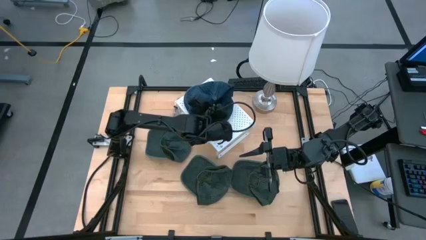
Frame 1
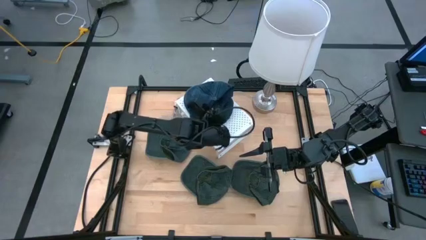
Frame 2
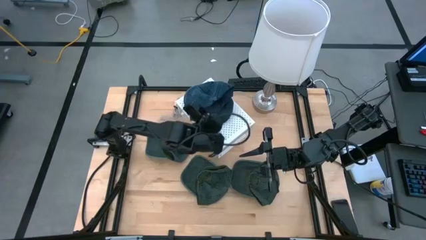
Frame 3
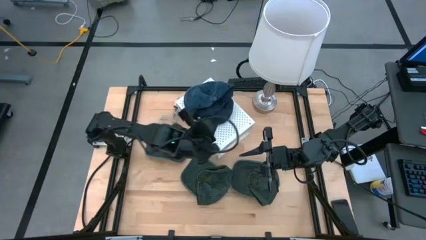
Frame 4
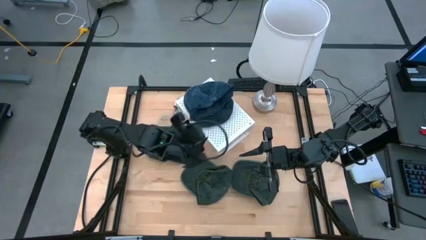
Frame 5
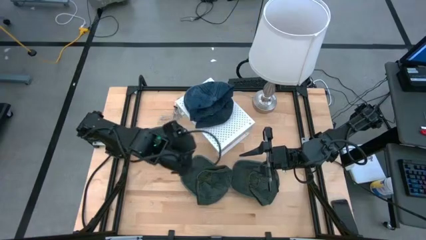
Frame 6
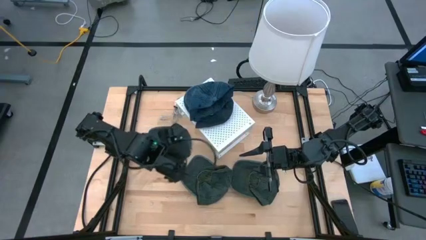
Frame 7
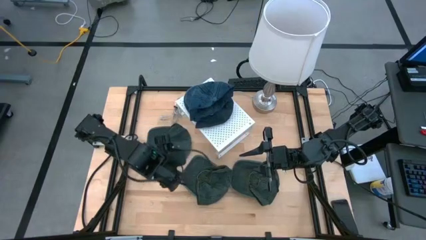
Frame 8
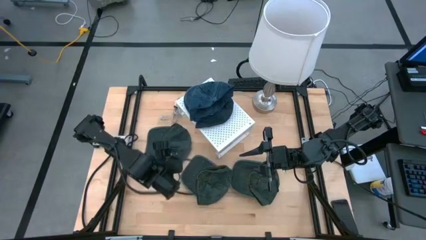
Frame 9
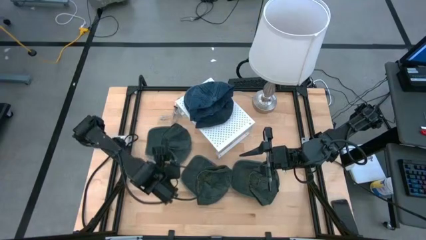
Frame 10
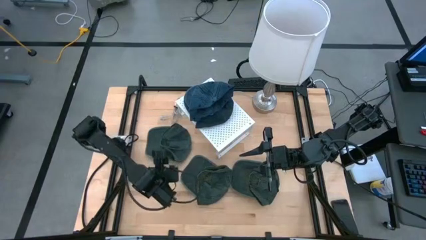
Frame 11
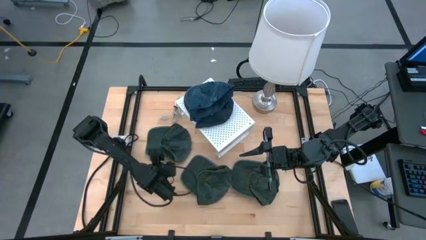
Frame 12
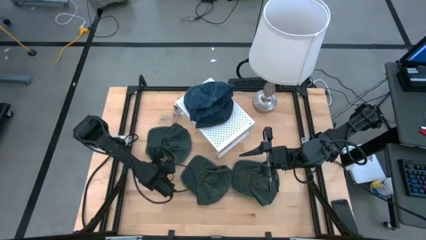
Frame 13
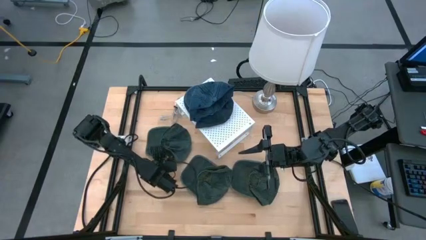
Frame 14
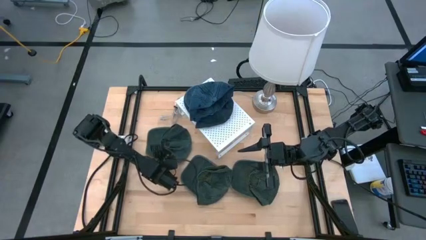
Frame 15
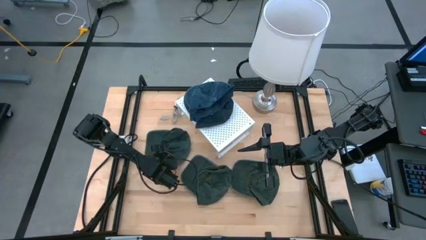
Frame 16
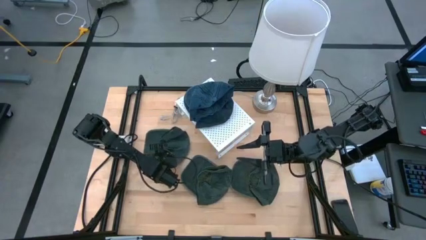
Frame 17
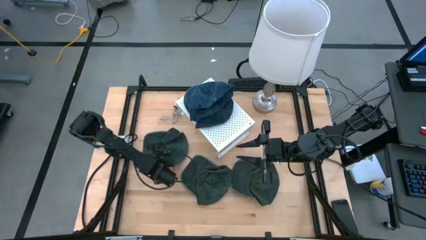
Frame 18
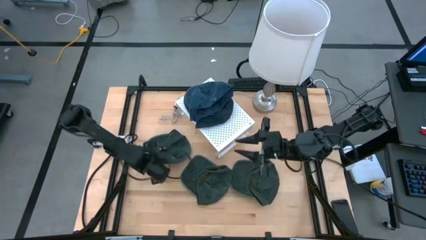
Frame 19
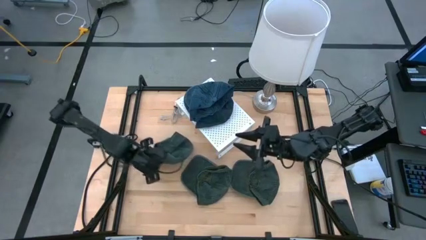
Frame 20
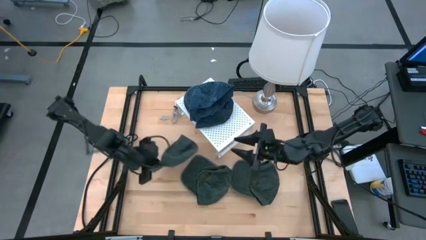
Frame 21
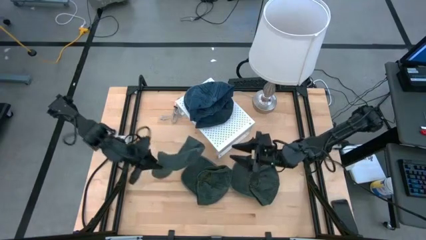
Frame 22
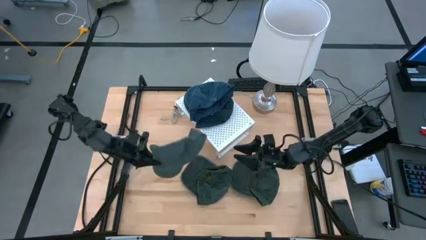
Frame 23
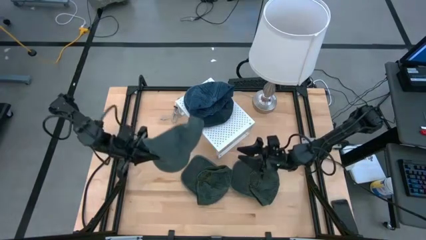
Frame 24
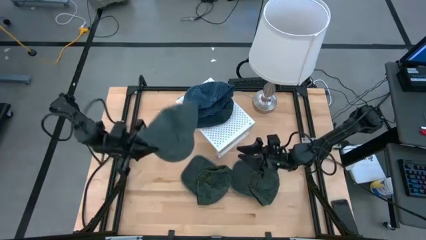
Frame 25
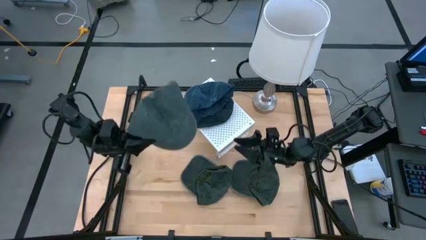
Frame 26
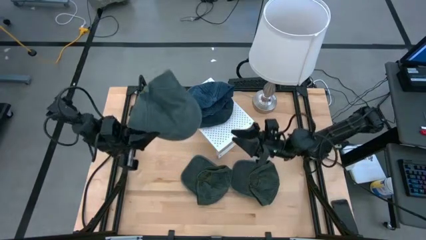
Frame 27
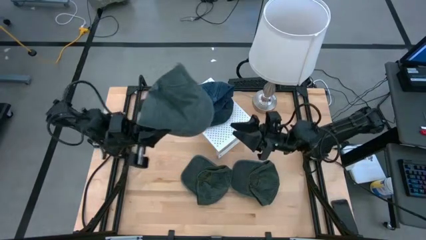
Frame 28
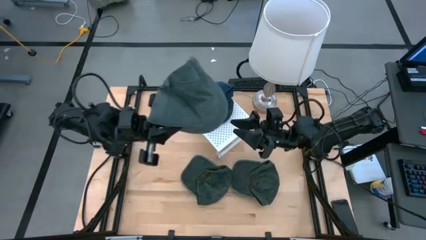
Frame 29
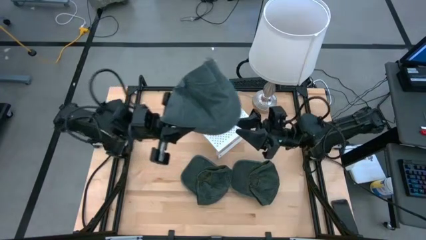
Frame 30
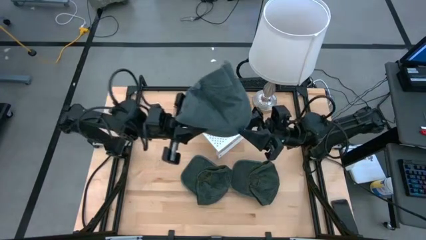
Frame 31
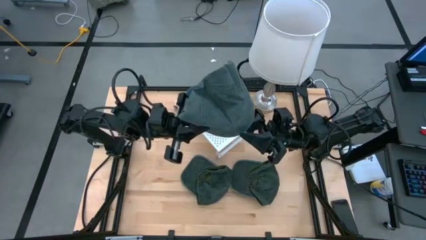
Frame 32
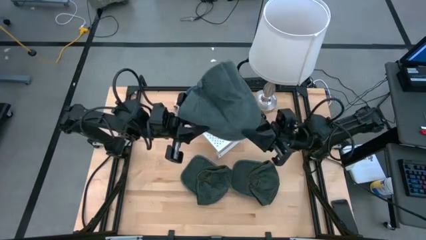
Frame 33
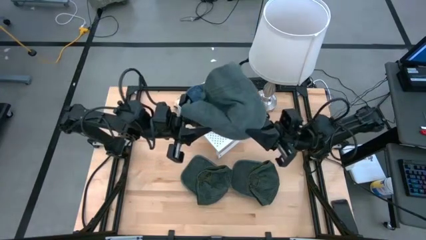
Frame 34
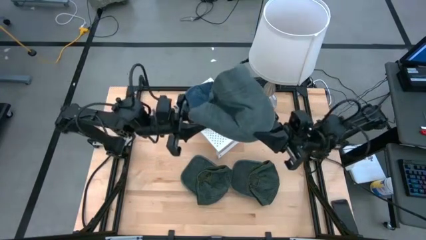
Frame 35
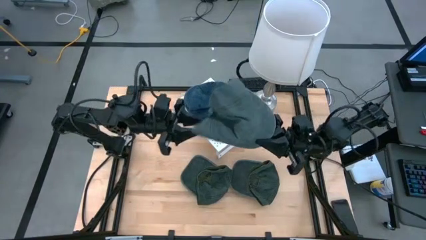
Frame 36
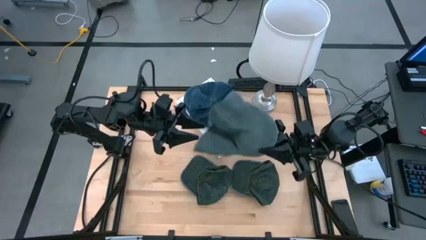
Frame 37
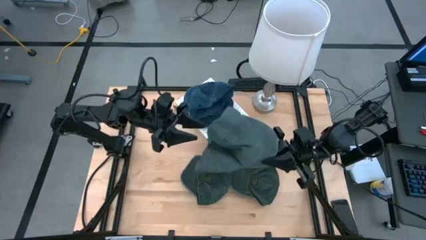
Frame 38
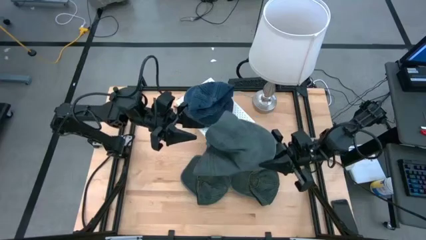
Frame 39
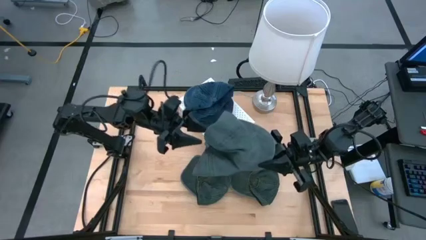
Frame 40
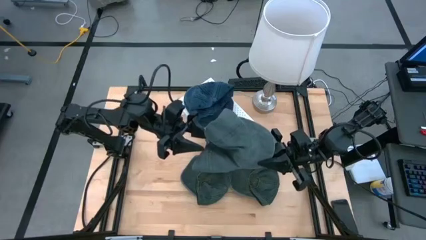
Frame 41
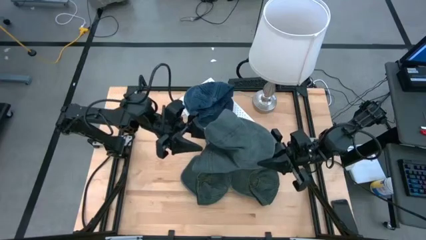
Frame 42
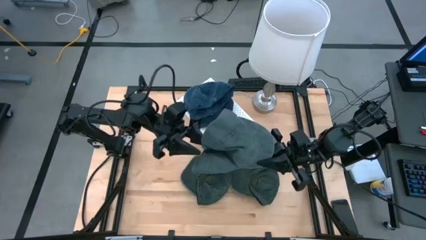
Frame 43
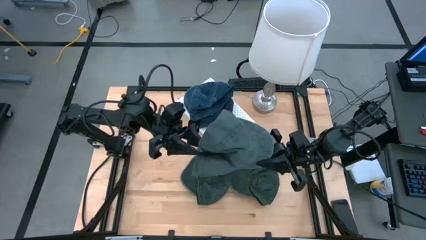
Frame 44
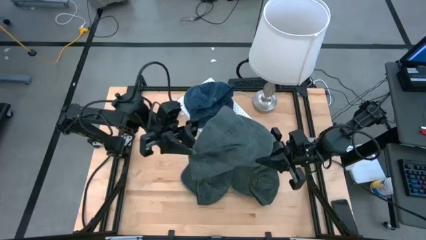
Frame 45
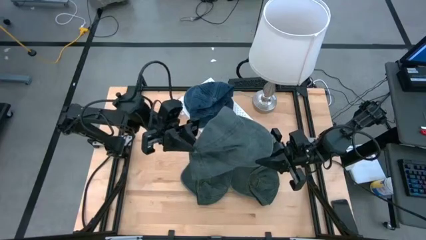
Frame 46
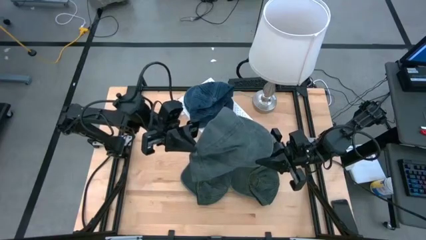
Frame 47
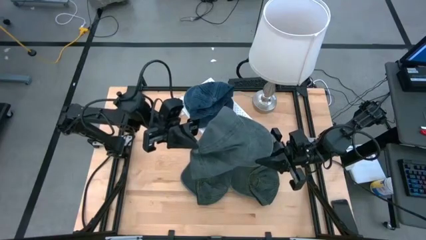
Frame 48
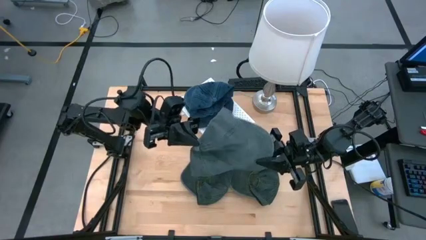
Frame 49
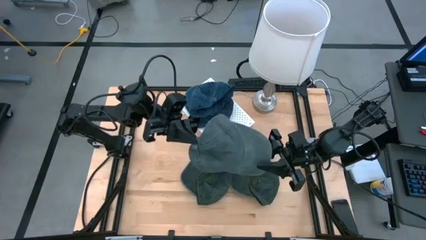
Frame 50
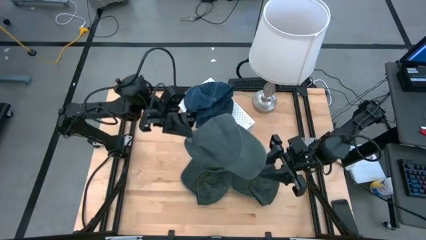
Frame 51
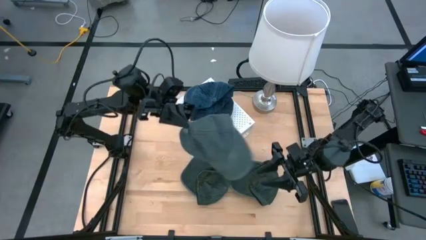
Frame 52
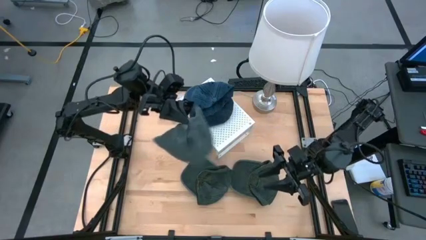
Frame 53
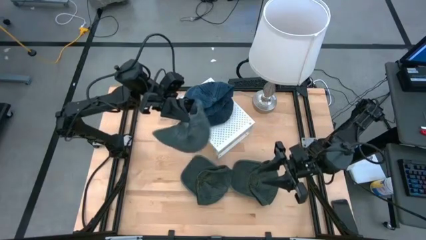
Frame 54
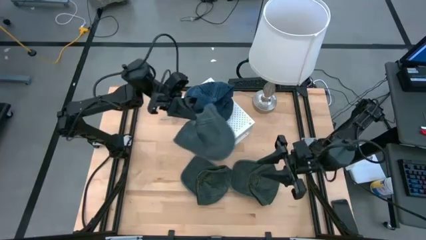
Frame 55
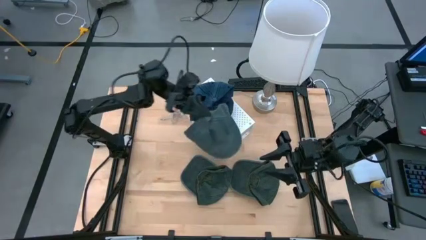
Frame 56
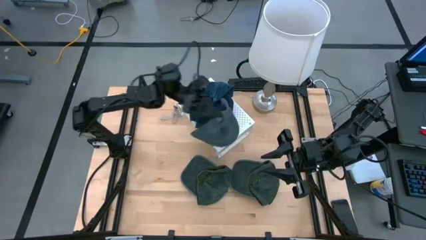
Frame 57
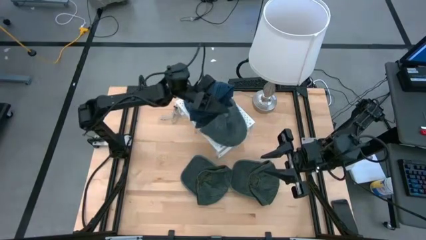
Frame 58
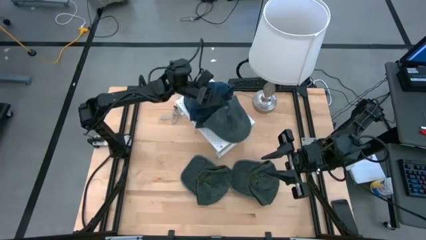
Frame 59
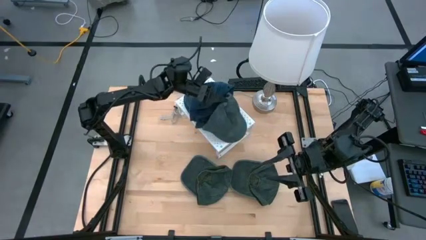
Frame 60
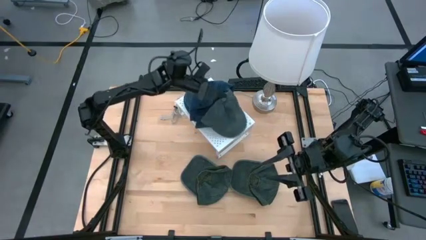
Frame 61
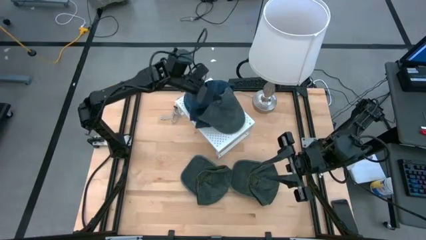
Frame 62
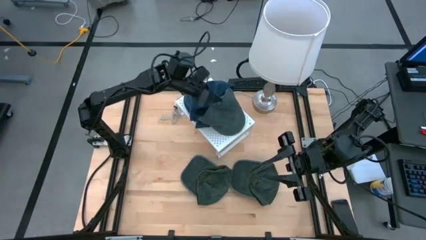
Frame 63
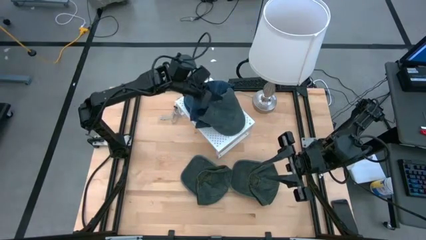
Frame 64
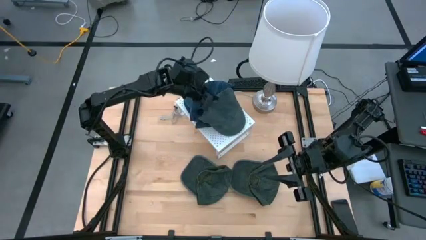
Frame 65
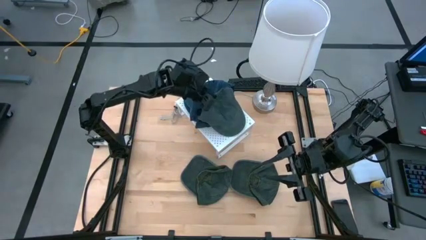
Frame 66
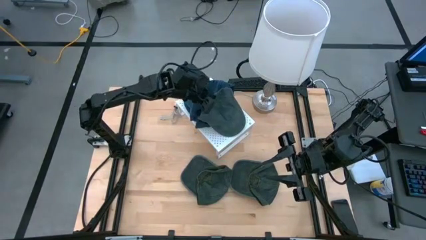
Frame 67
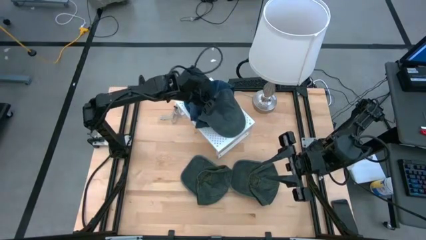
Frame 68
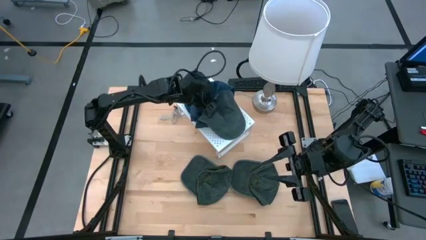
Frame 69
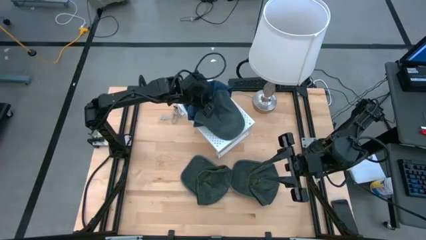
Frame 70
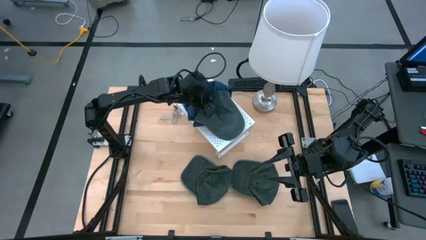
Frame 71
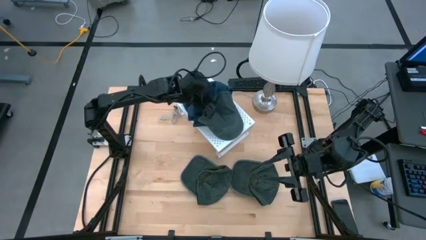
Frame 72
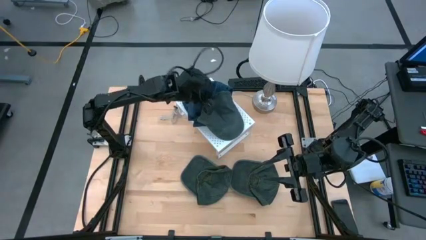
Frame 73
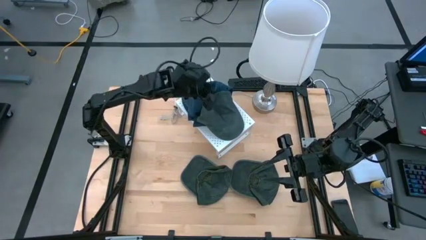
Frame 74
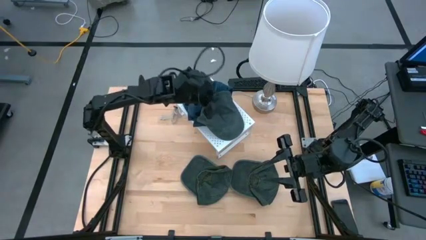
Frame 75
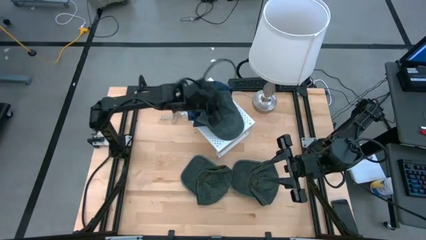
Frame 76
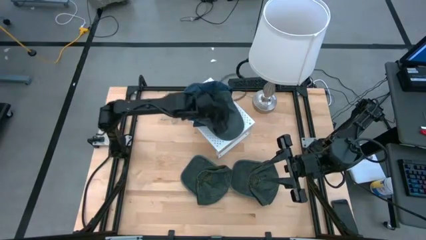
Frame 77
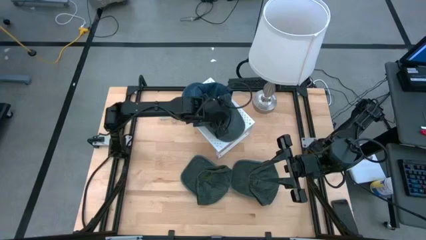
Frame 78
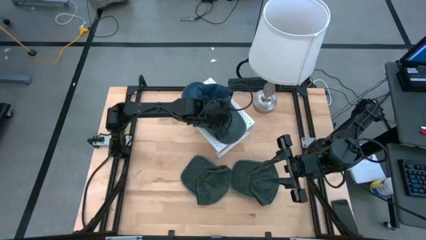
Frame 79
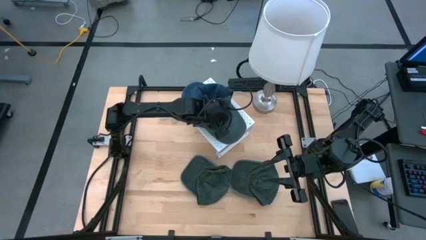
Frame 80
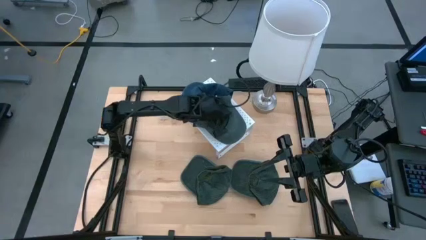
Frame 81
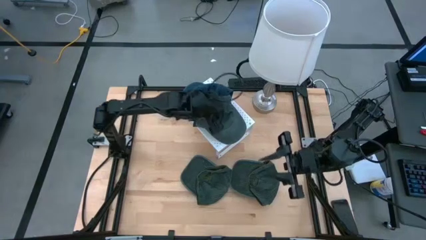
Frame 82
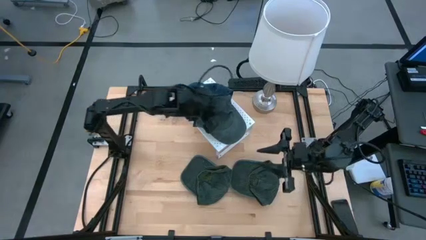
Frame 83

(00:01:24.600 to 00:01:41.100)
Task: Pick & Place hat
Put the top left gray cap on the shelf
